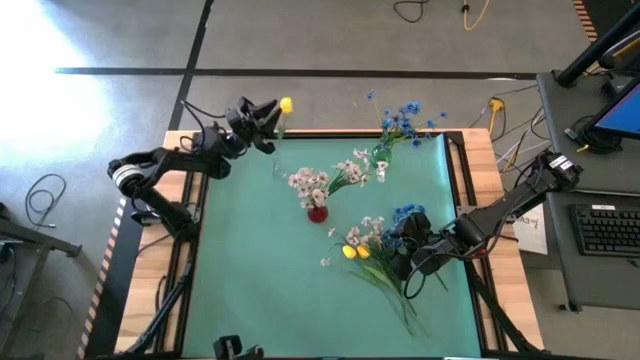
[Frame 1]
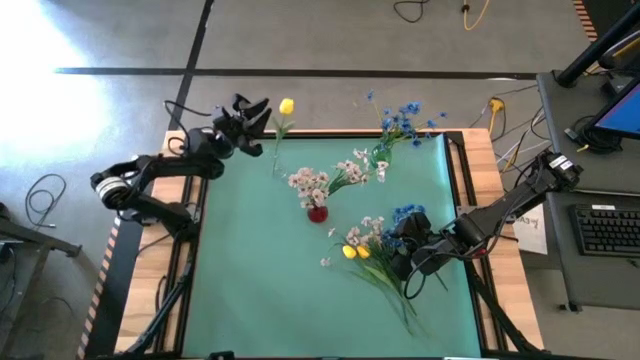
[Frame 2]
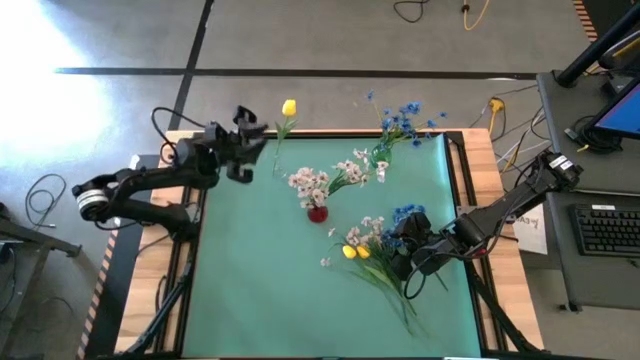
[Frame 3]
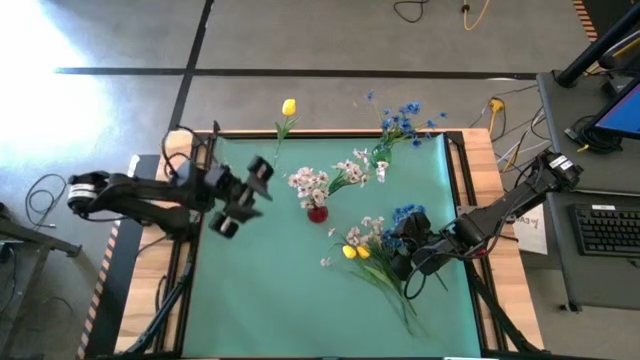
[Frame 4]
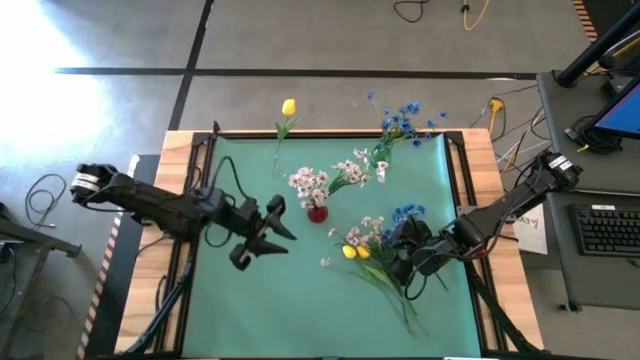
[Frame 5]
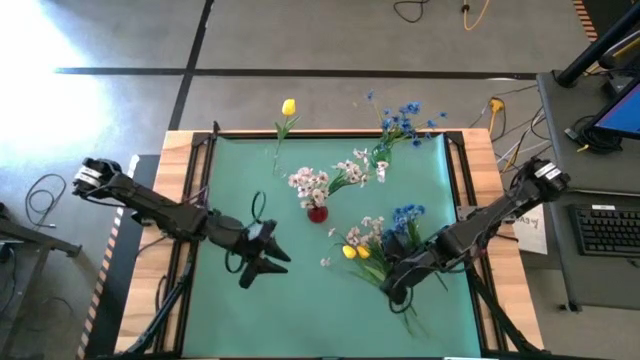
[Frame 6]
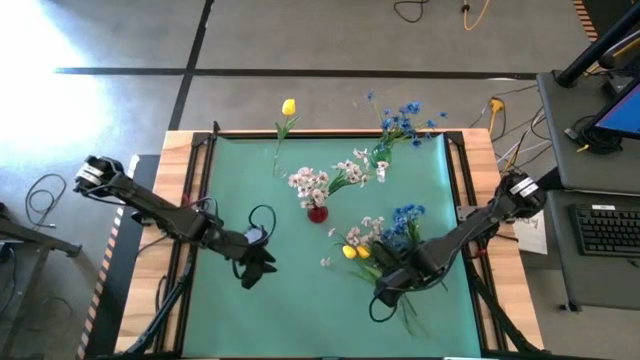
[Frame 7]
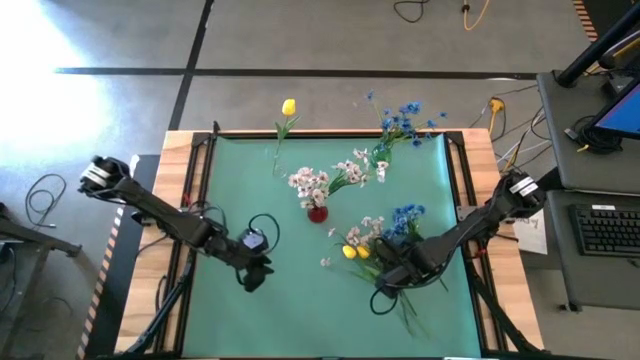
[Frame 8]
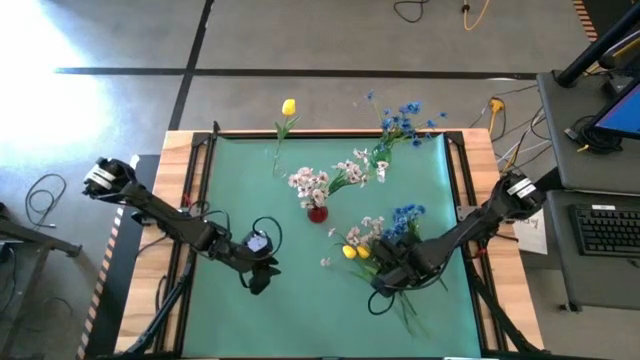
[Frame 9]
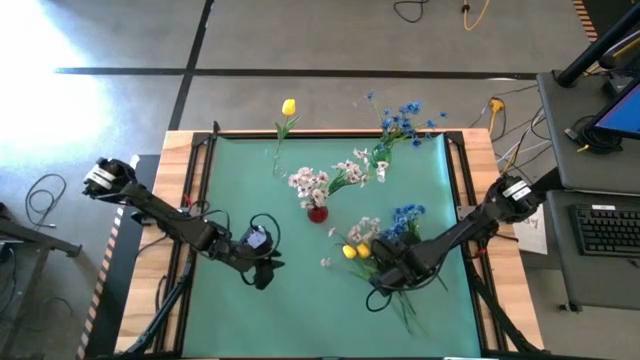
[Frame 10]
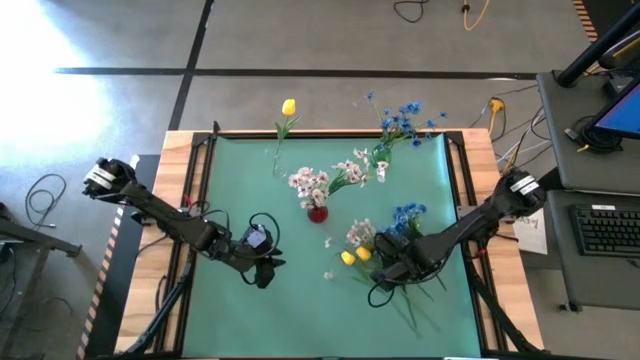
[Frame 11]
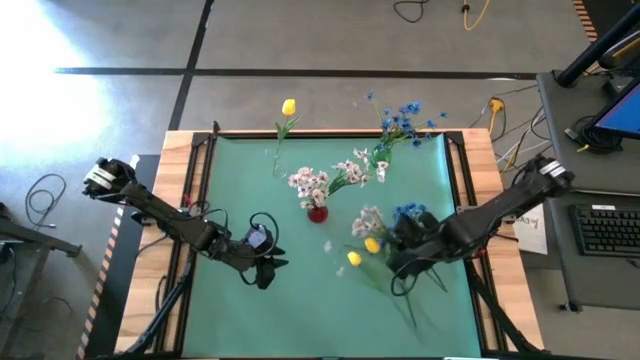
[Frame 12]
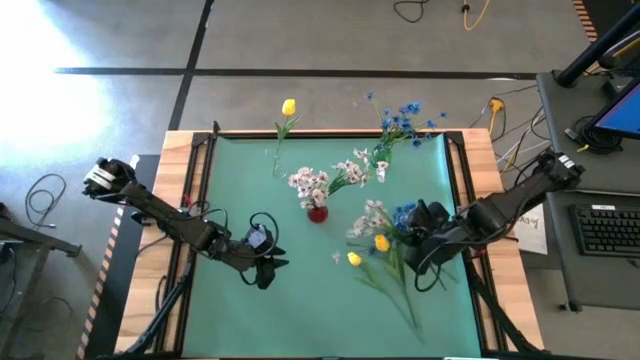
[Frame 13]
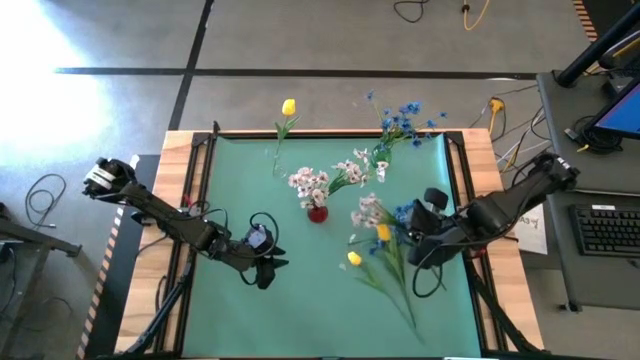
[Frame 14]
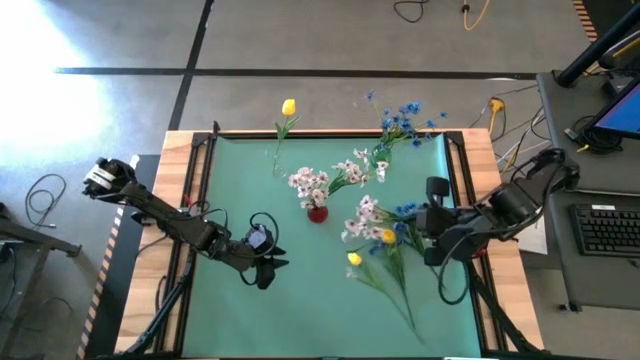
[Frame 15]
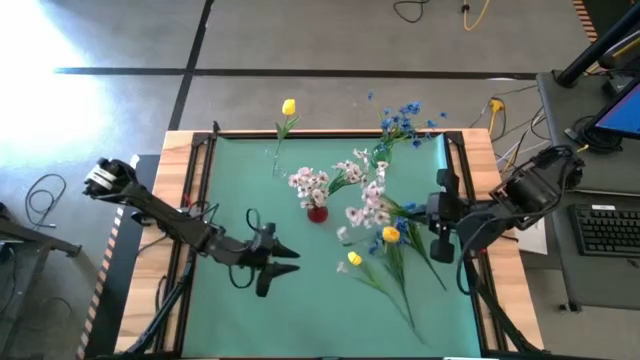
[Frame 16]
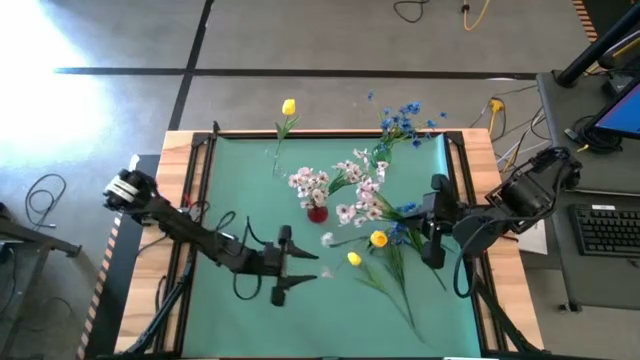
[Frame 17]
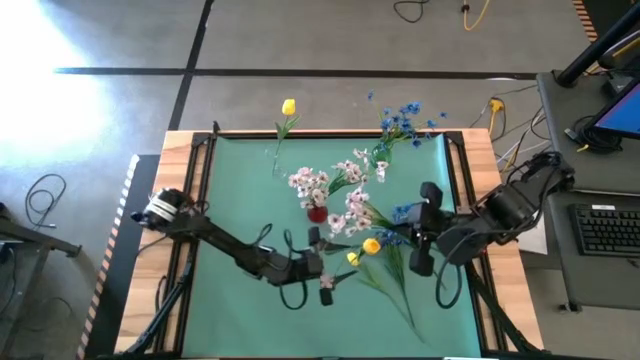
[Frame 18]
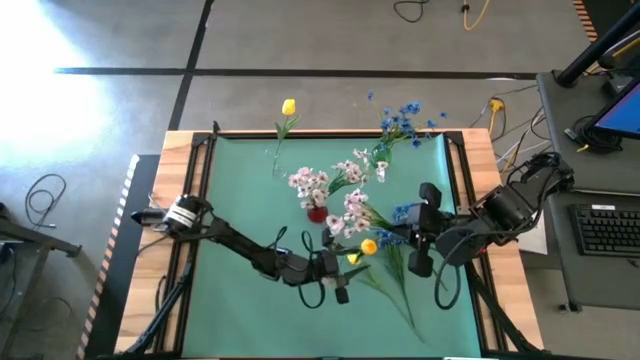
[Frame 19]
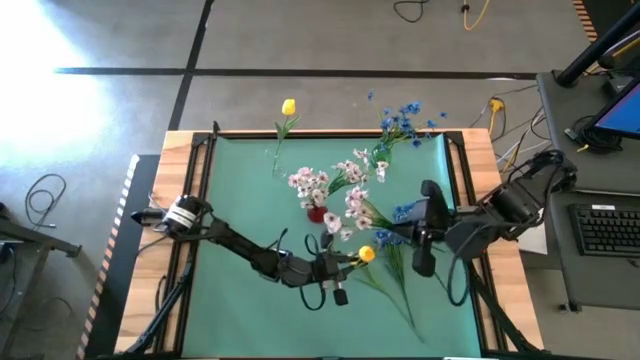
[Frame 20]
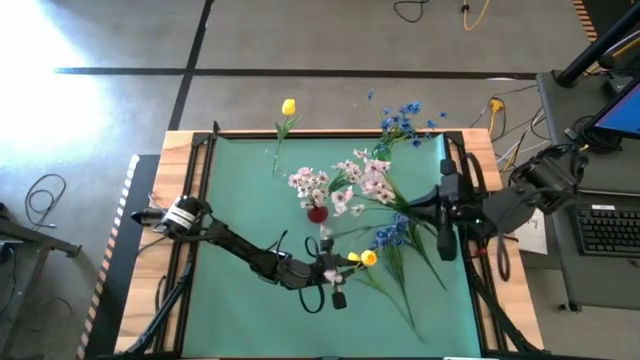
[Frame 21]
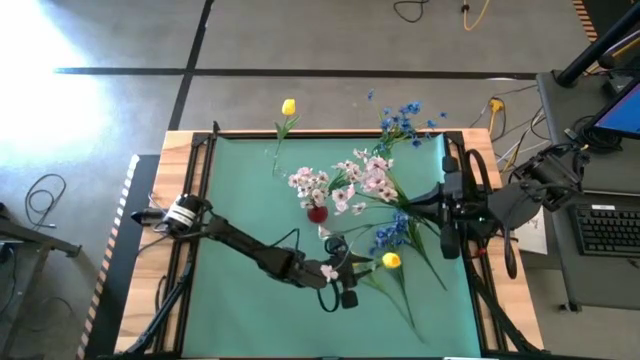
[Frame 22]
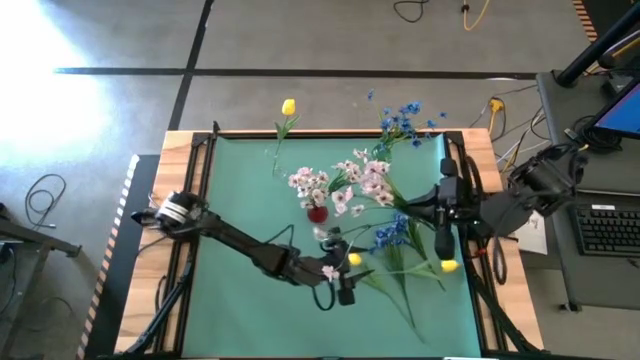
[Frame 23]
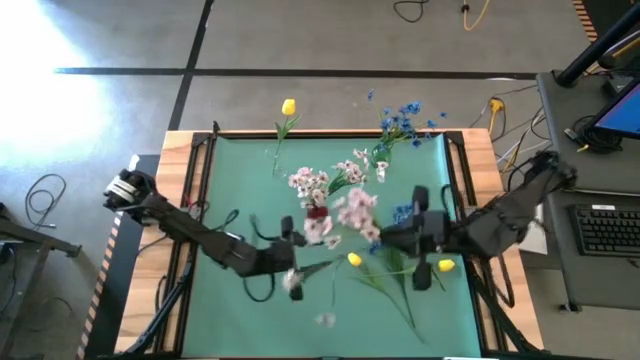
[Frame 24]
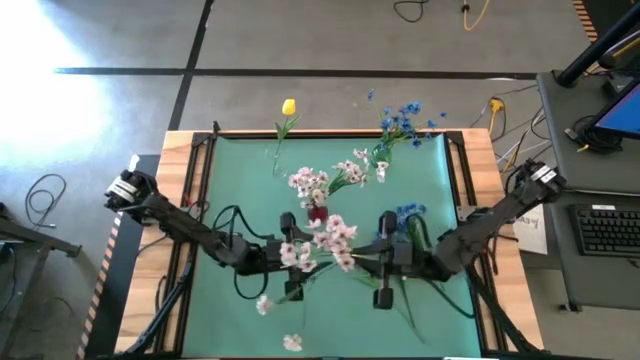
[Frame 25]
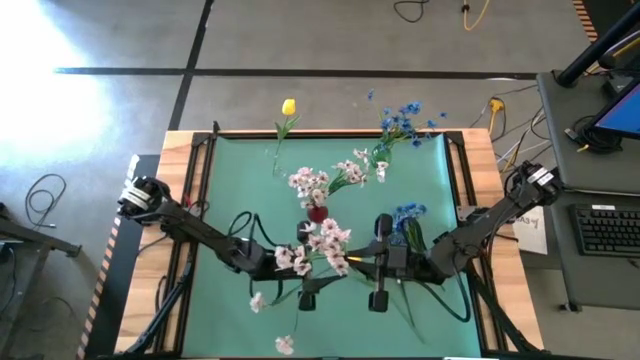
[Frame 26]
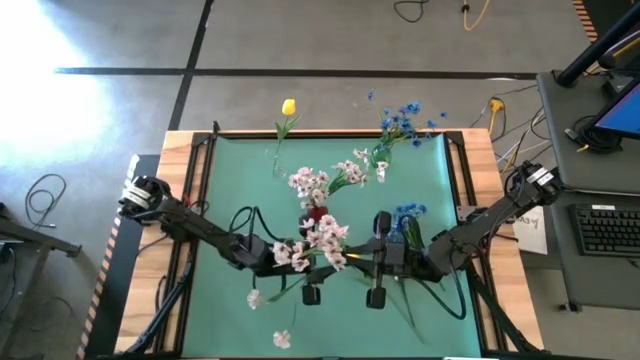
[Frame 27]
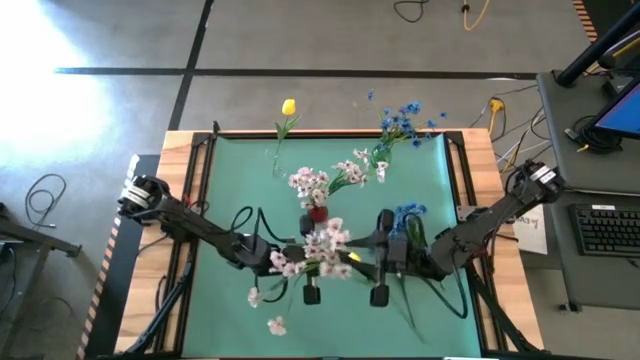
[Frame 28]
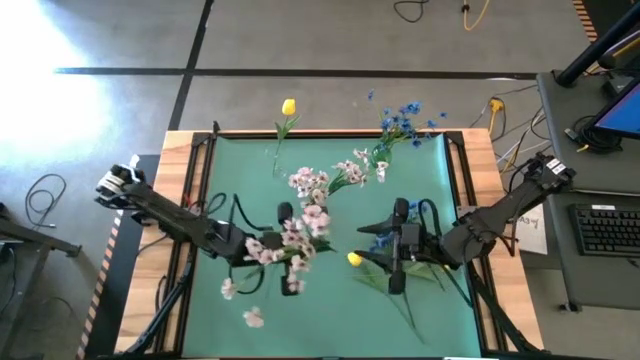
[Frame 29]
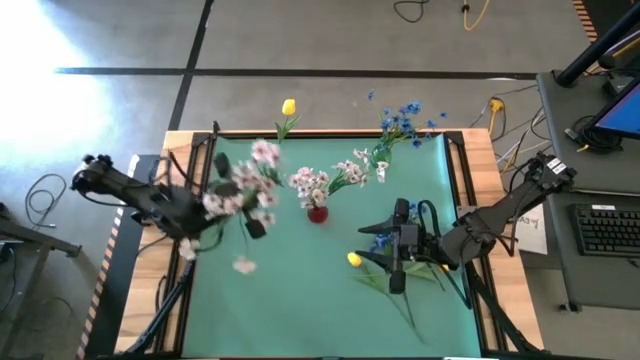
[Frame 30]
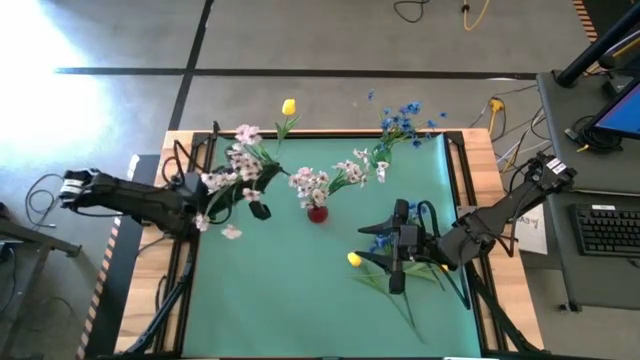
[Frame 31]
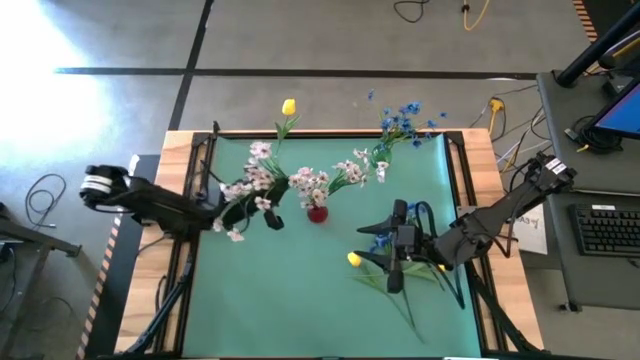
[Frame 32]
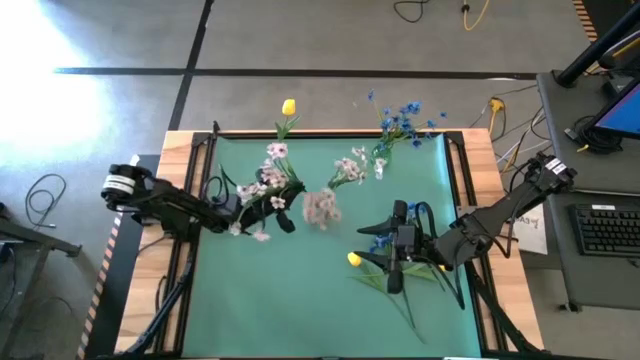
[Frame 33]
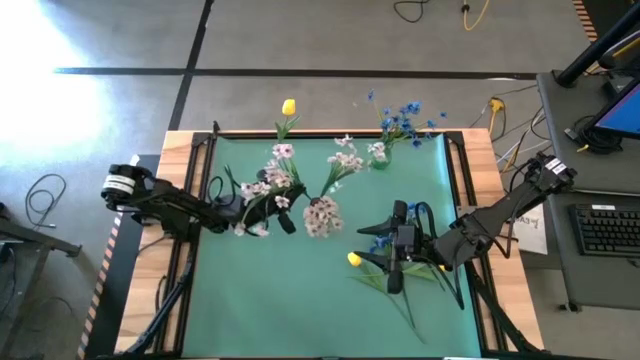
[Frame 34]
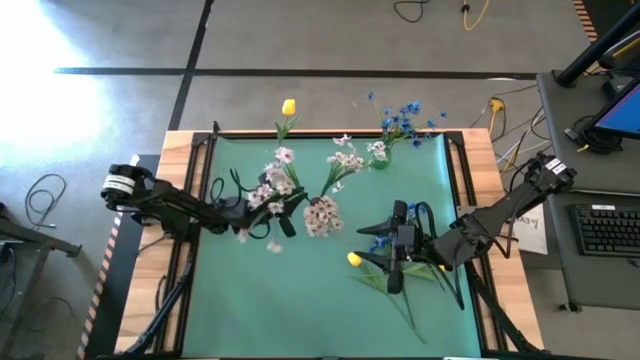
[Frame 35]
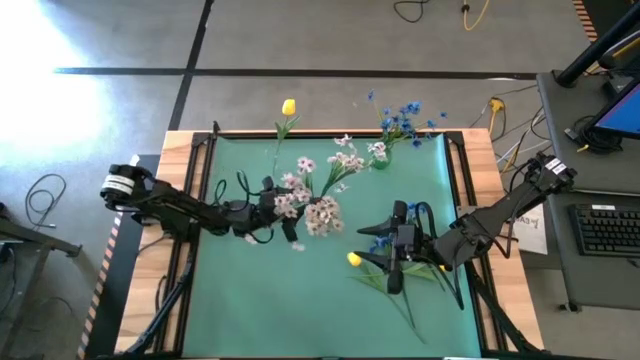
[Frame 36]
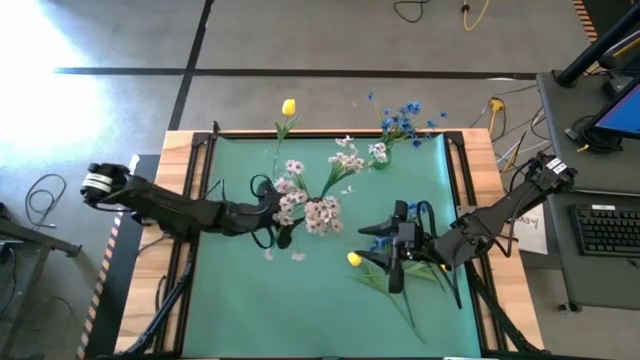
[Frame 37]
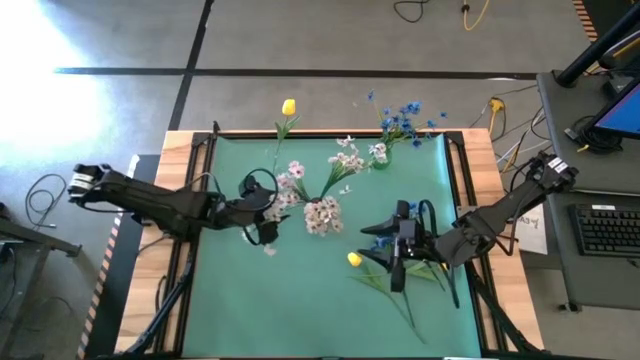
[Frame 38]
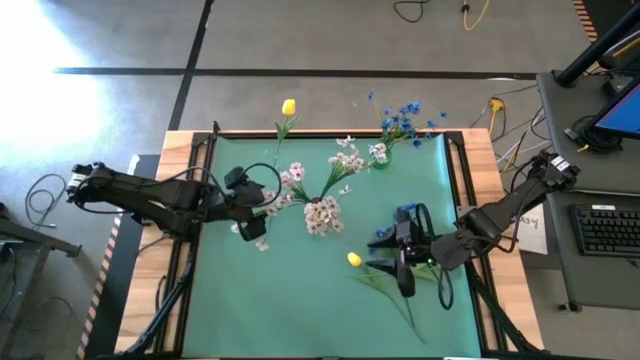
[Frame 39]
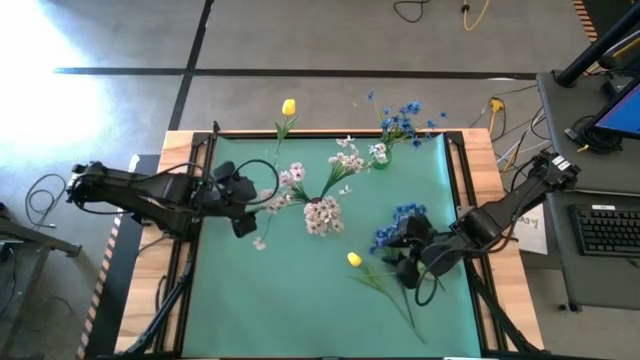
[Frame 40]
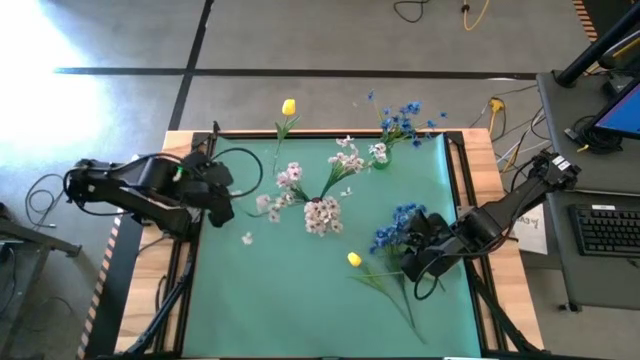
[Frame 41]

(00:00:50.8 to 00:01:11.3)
Task: Sort flowers into vase by color
Put the white flowers into the red vase
